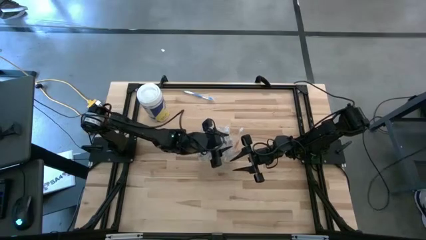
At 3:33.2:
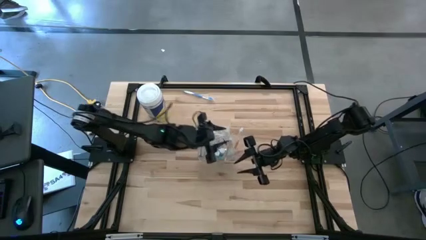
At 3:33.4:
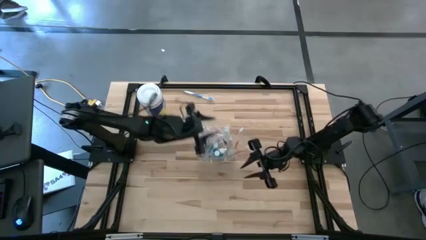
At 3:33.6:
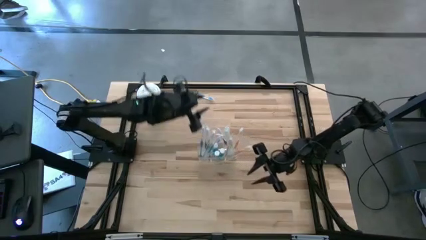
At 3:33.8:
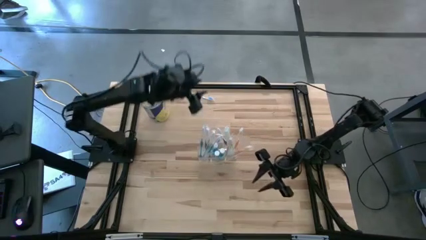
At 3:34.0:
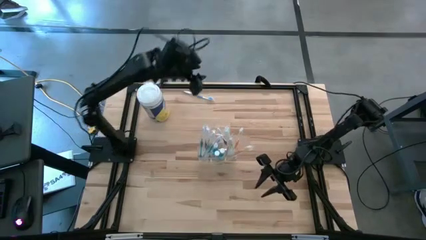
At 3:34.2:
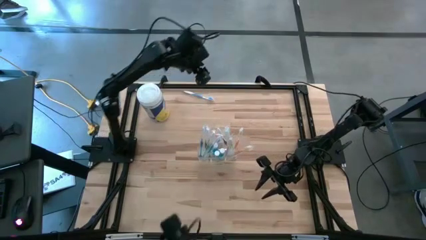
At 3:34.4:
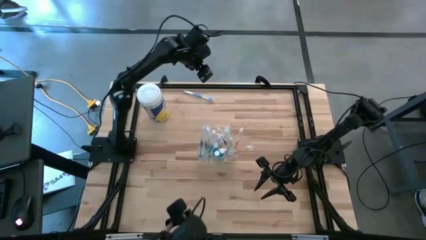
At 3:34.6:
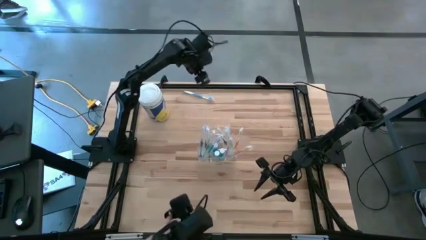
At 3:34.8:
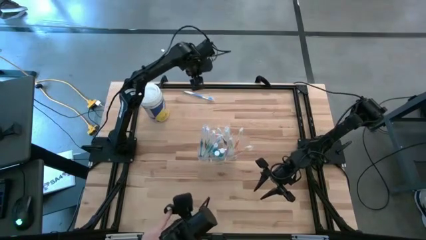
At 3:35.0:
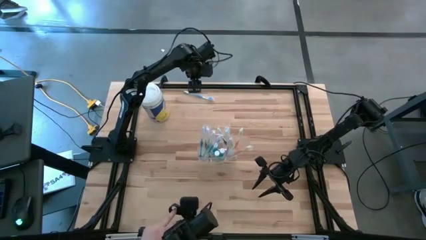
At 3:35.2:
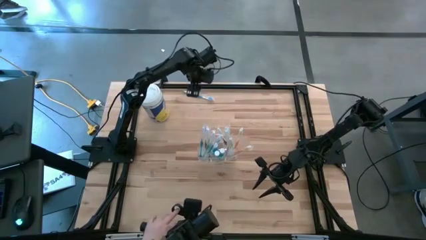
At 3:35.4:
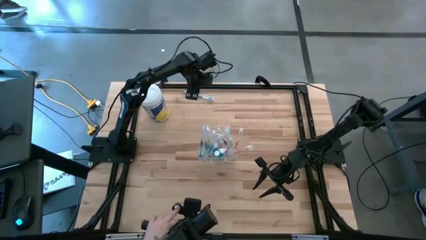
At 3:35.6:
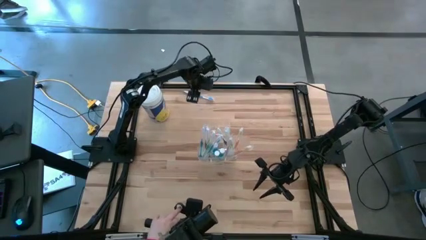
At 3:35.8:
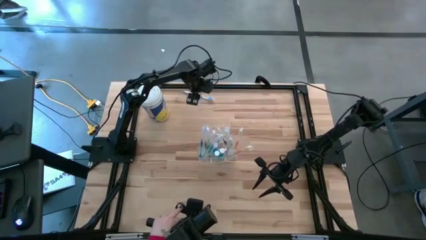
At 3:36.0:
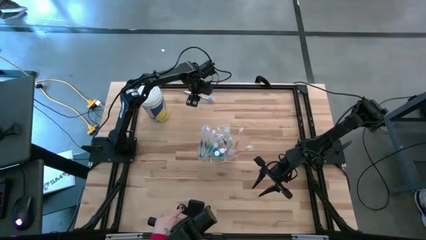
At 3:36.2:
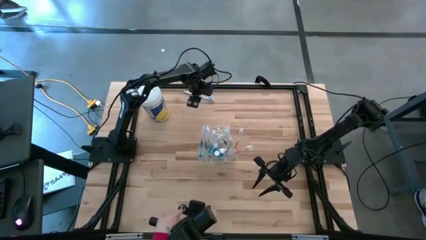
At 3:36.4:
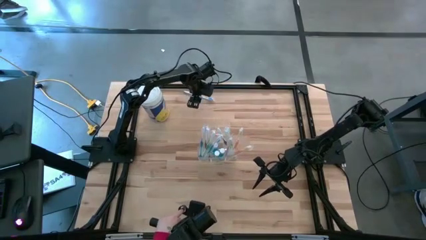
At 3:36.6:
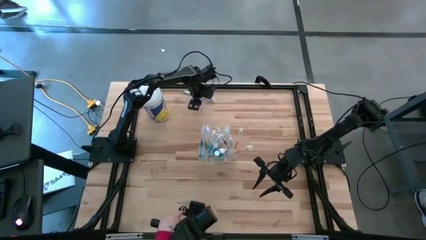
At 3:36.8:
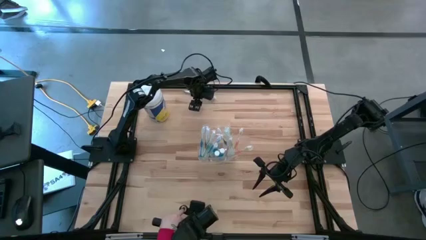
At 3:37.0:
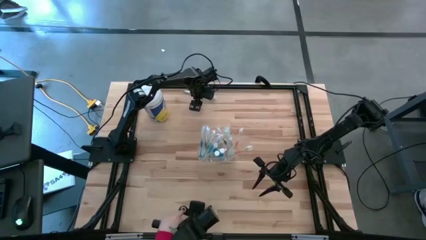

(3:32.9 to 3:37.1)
Task: Pick & Place toothbrushing station
Put the blue toothbrush into the transparent organizer

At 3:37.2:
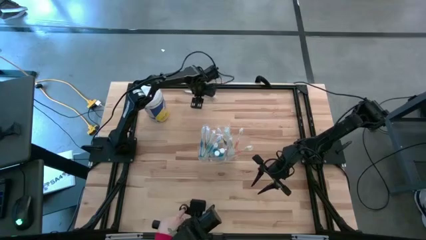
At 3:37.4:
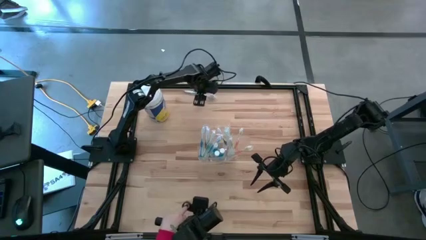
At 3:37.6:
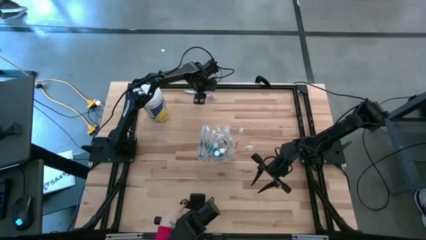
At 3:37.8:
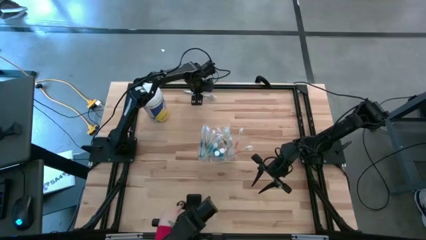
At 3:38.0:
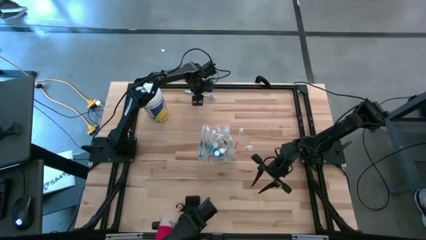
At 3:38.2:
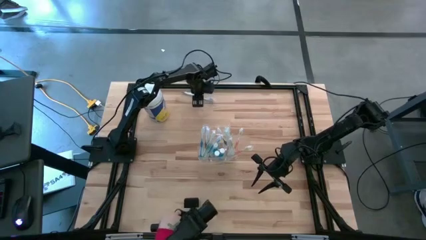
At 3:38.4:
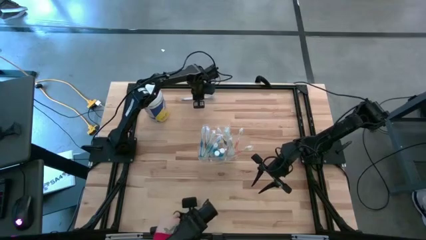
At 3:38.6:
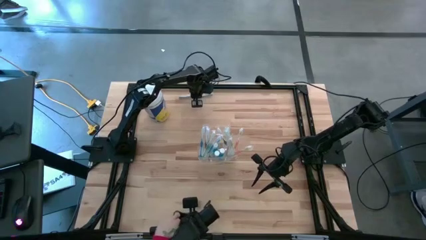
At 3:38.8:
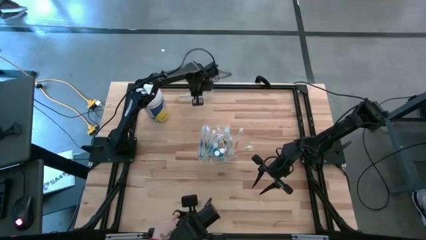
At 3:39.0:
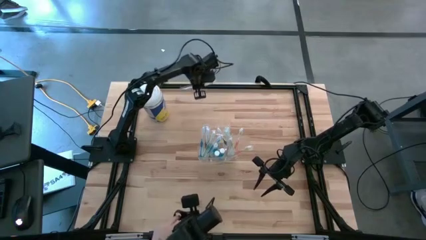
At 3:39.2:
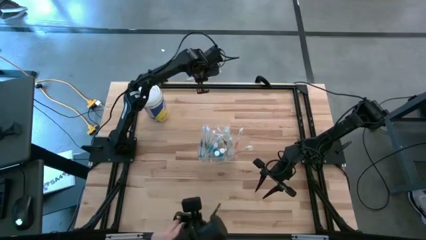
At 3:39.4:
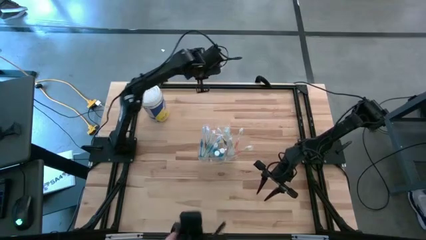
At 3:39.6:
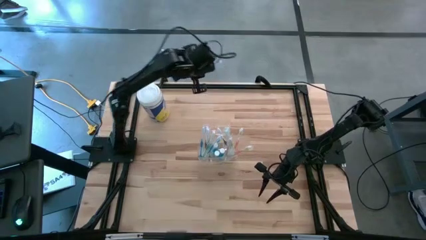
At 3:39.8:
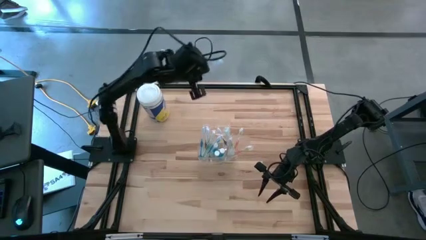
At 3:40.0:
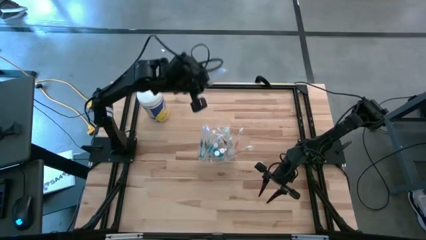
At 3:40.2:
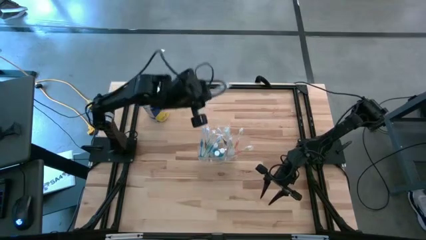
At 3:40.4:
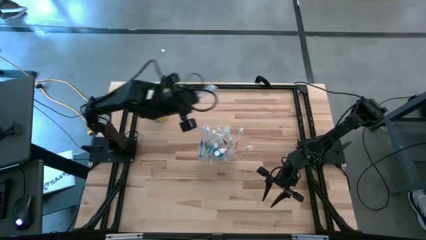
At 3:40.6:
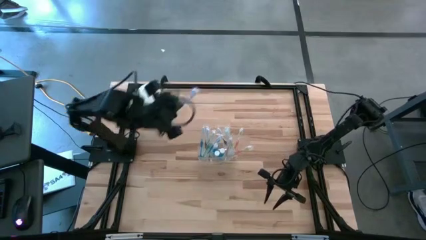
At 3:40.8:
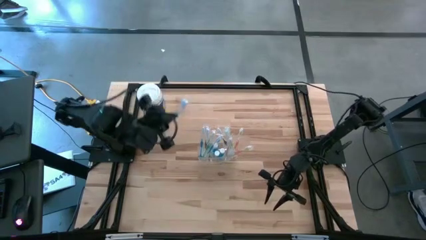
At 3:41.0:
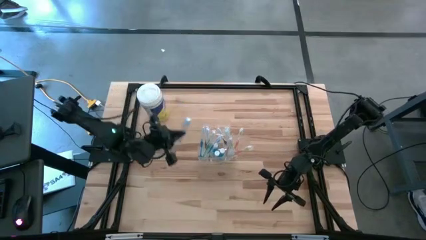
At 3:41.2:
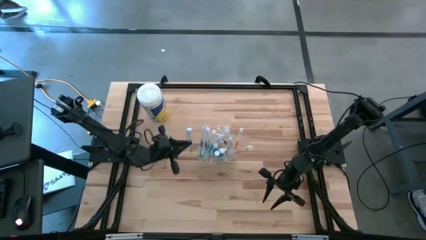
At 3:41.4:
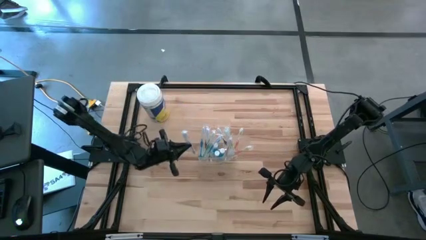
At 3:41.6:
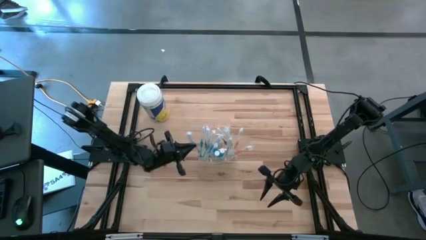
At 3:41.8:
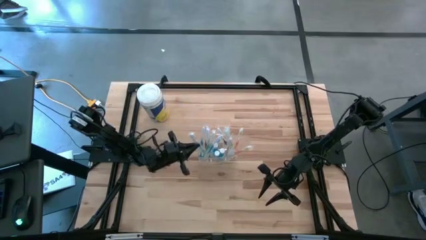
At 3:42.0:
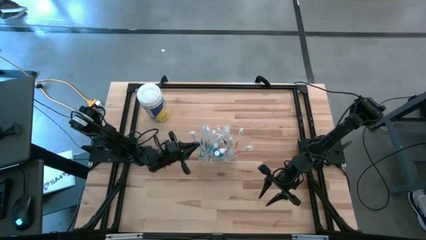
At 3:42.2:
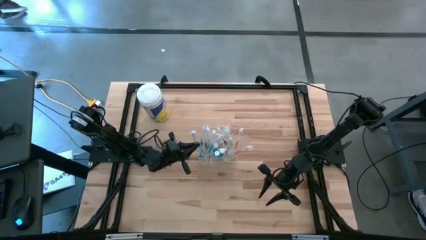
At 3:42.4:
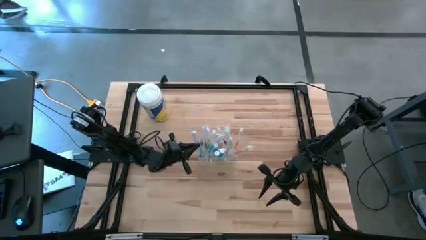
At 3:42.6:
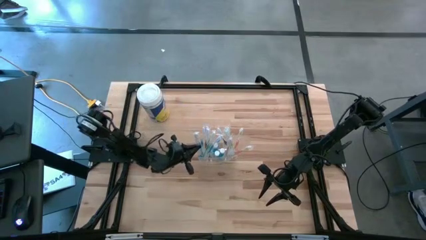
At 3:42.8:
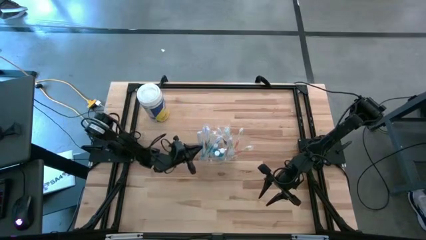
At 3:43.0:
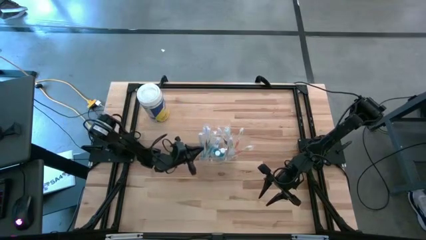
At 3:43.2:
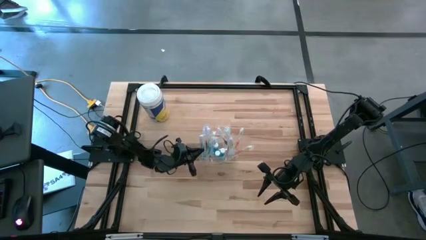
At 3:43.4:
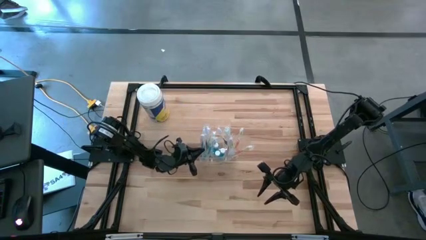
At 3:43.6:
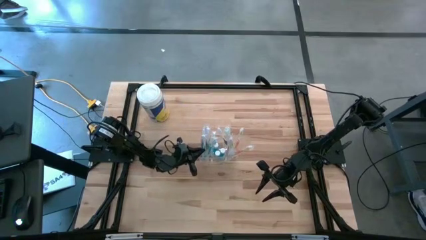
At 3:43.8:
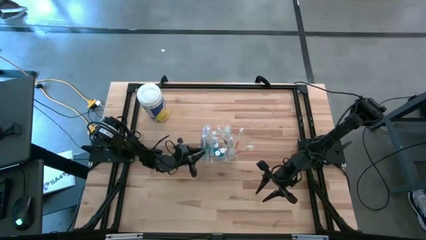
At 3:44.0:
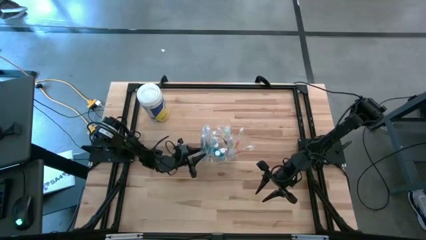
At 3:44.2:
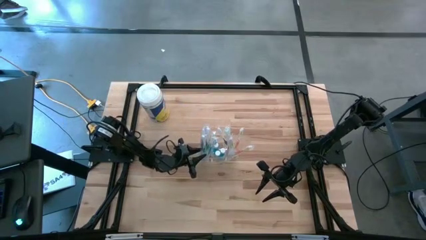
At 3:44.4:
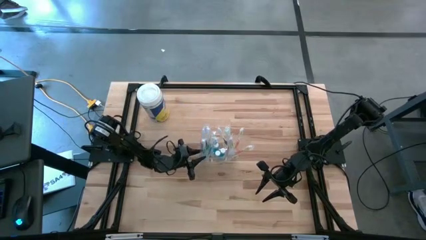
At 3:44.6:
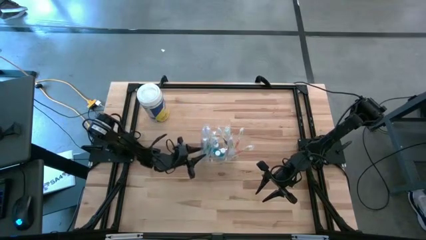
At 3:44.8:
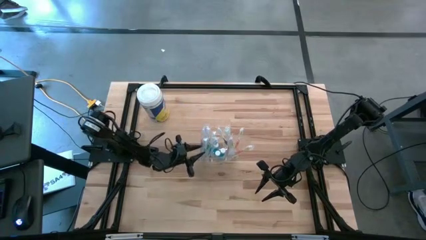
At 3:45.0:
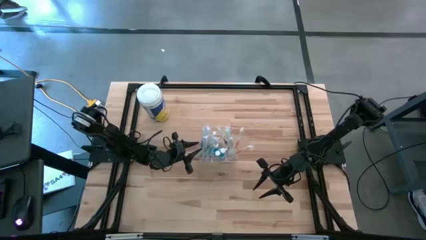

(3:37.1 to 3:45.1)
Put the blue toothbrush into the transparent organizer

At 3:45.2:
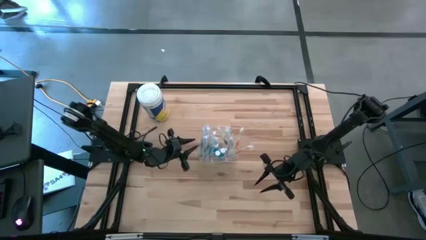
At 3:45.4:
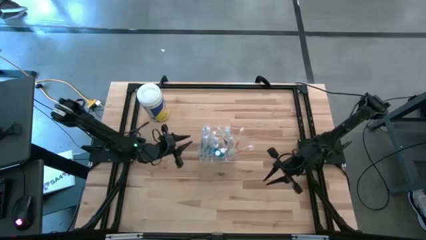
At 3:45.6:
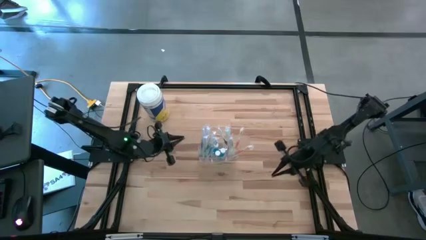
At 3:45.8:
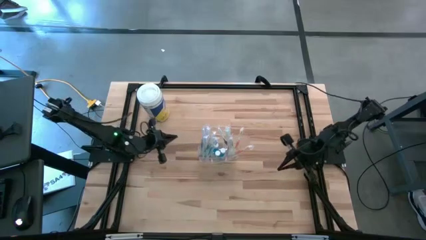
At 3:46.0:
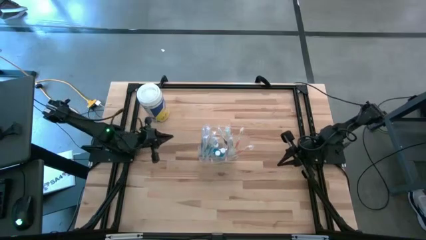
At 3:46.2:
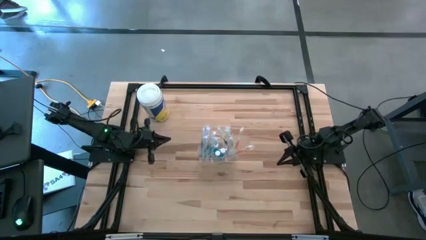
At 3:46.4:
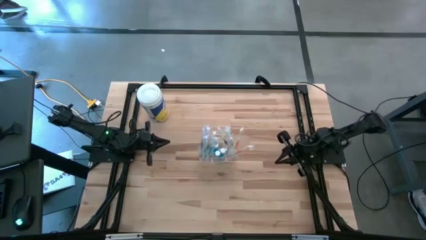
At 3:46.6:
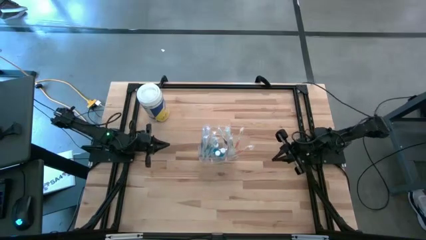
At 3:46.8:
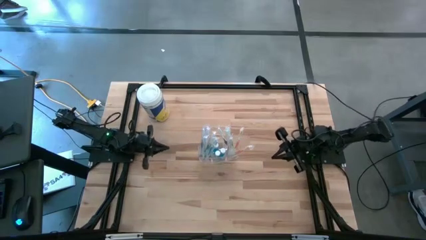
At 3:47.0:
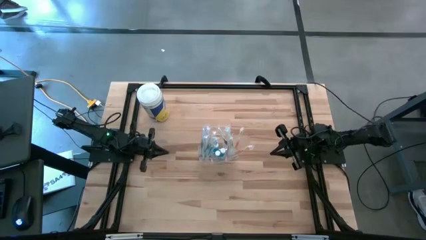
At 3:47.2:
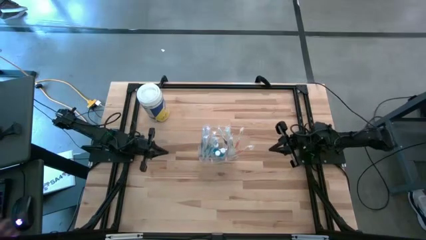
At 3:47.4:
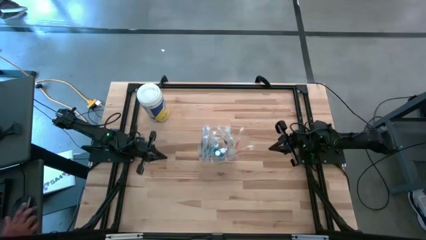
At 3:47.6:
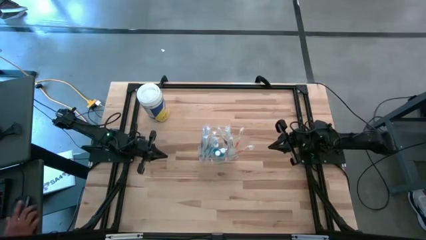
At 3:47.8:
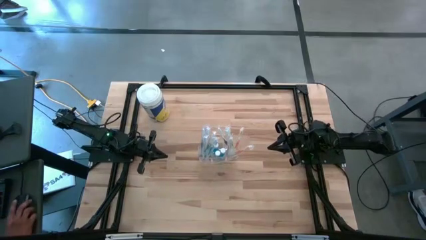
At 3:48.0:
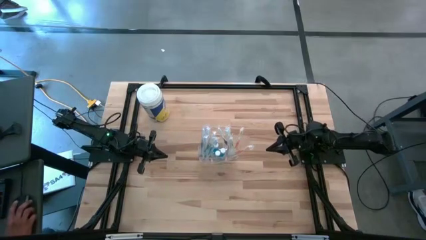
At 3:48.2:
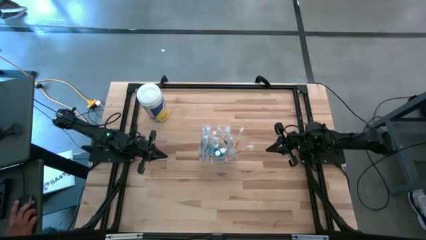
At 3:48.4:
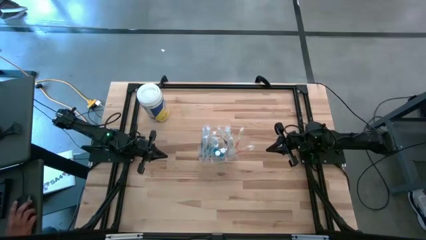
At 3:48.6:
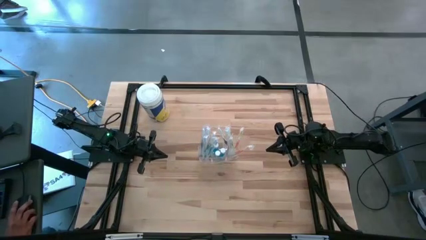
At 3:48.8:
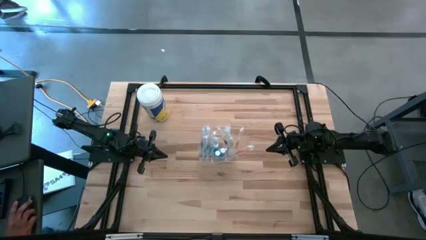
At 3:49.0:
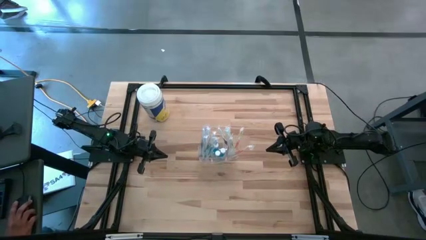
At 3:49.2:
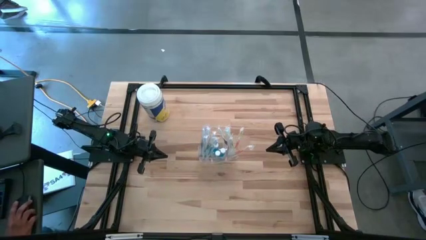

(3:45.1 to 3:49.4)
Return to Home Position

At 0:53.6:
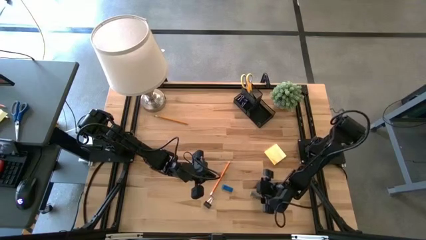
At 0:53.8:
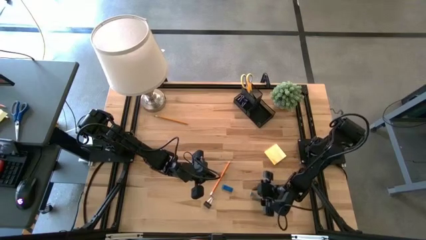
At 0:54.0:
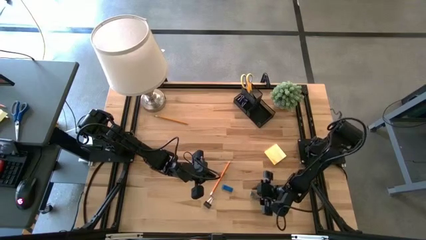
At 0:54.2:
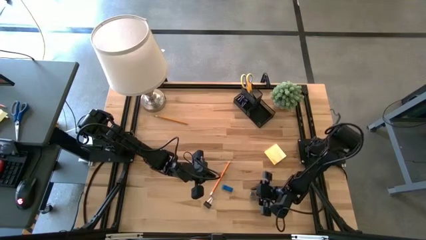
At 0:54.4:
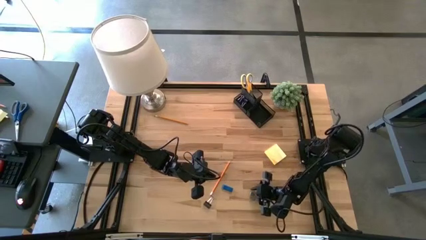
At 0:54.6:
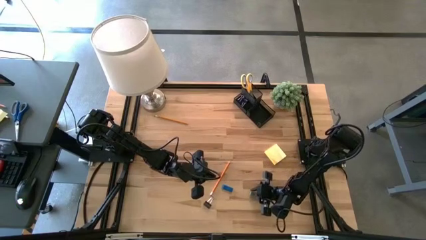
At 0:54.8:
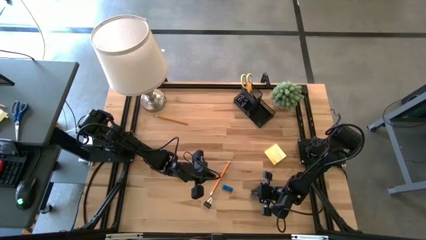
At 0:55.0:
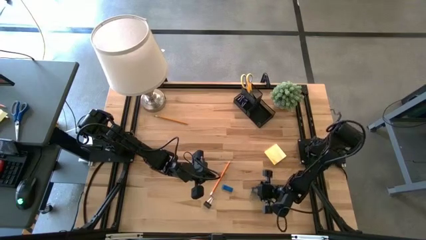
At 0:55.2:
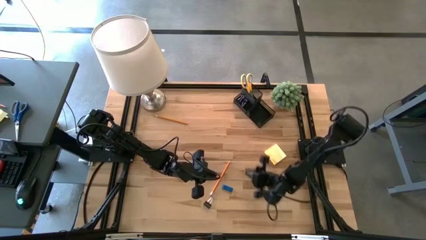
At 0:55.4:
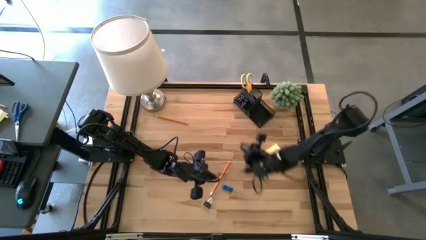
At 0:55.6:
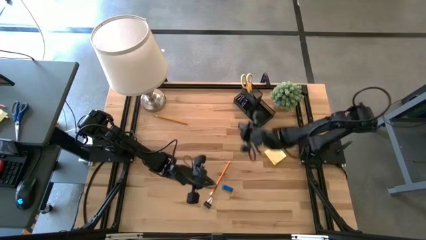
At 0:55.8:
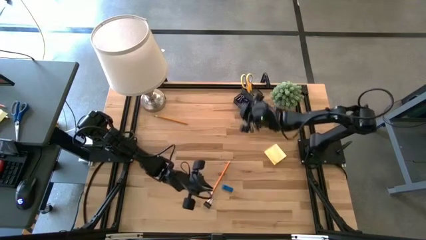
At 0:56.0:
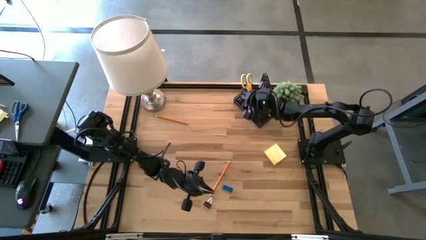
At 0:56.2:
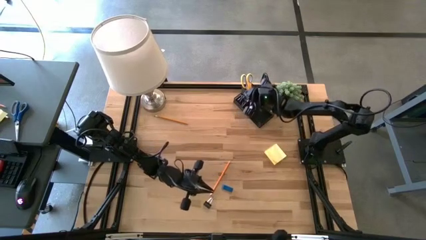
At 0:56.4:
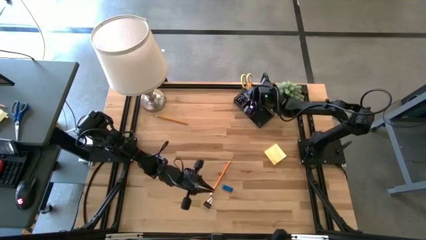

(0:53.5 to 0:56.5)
Task: Pick and place office supplies into organizer
Put the blue binder clip into the desk organizer
